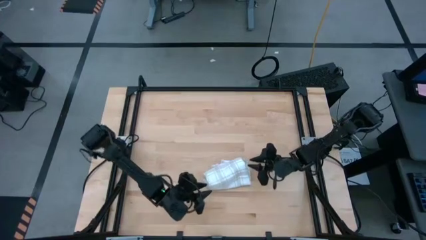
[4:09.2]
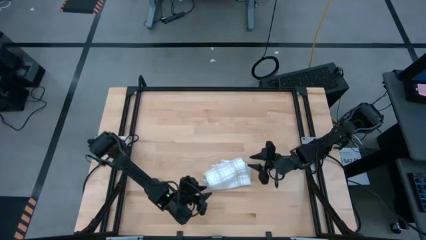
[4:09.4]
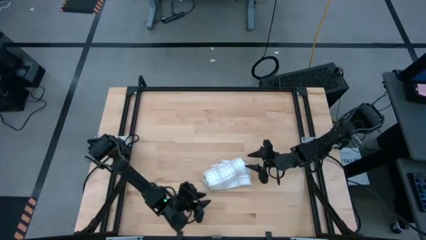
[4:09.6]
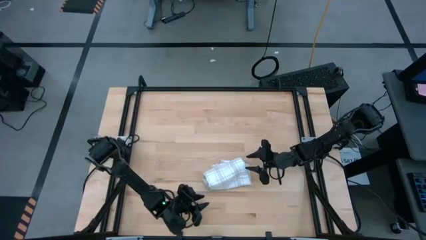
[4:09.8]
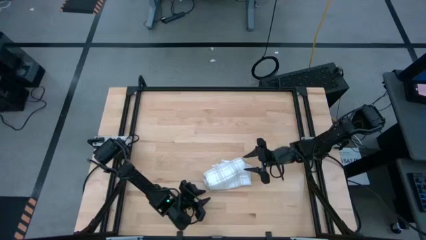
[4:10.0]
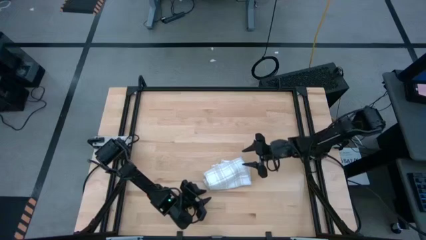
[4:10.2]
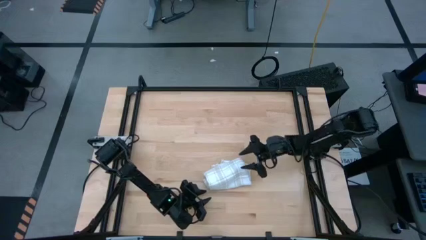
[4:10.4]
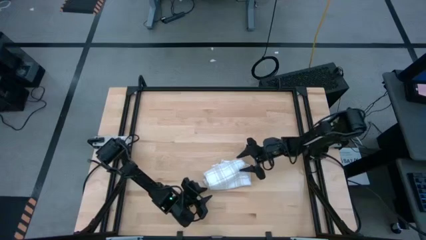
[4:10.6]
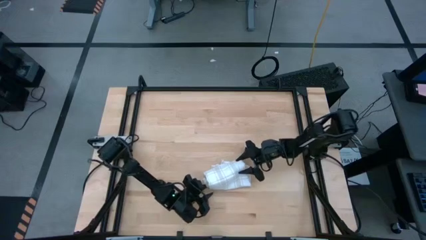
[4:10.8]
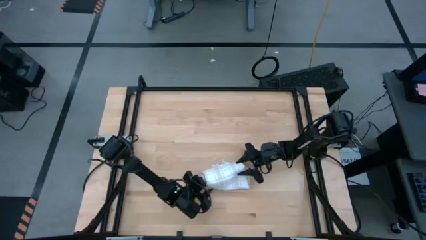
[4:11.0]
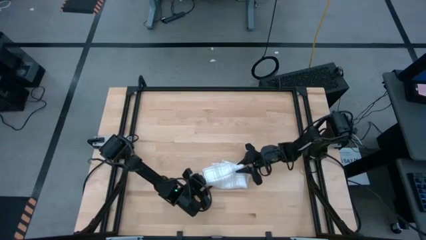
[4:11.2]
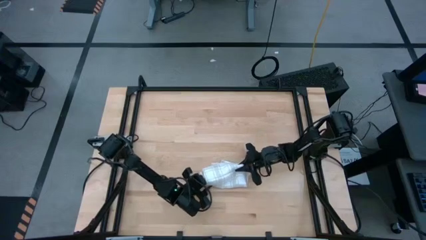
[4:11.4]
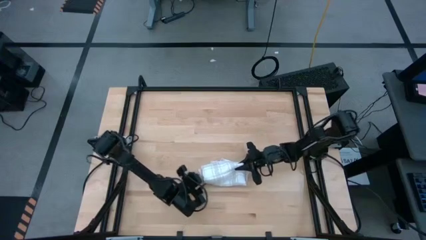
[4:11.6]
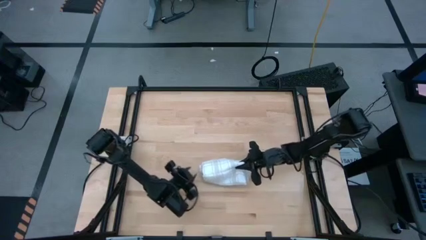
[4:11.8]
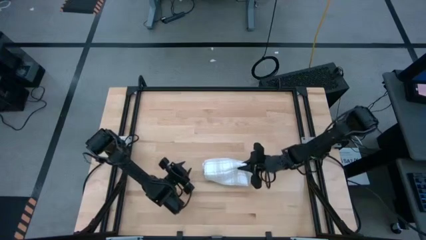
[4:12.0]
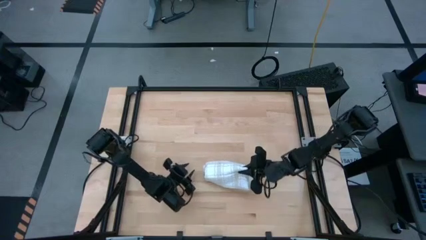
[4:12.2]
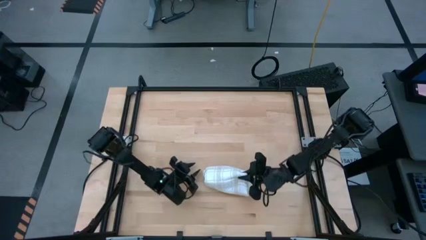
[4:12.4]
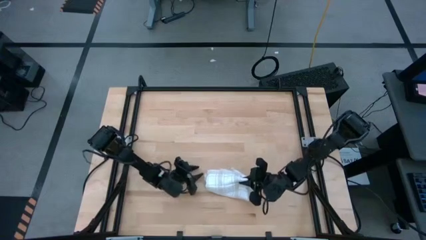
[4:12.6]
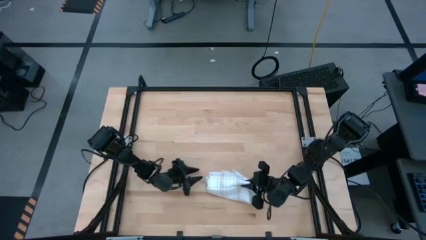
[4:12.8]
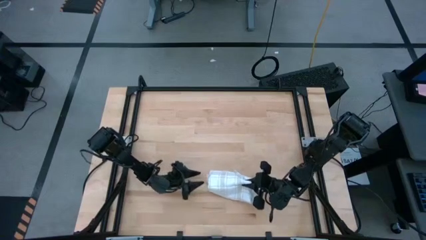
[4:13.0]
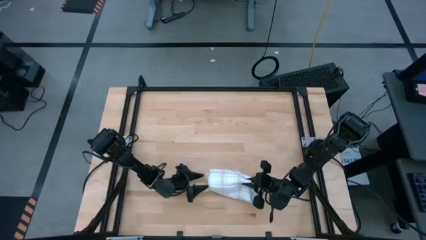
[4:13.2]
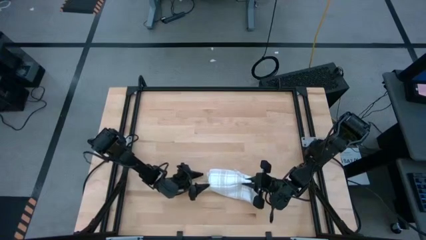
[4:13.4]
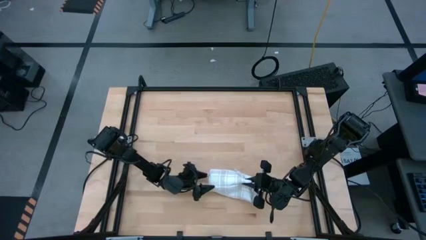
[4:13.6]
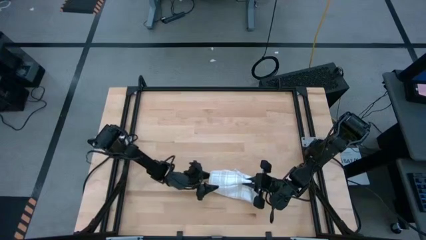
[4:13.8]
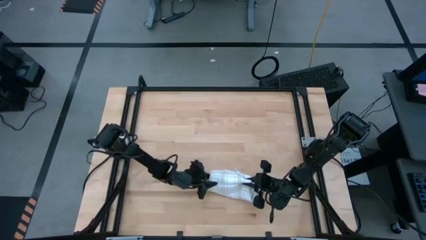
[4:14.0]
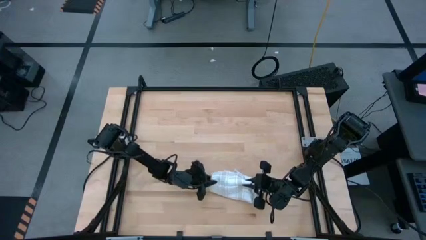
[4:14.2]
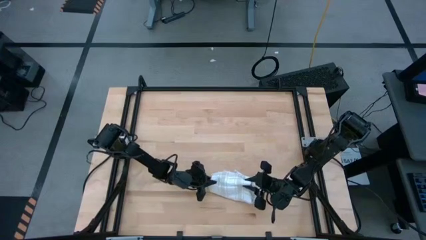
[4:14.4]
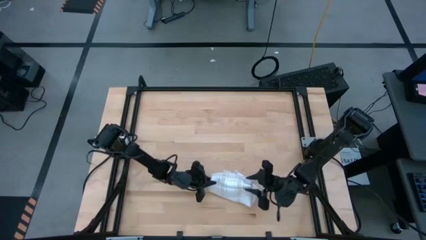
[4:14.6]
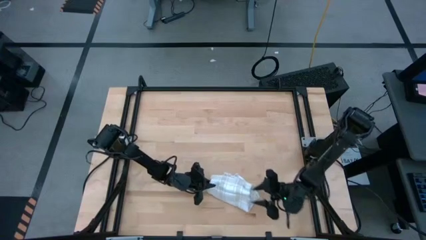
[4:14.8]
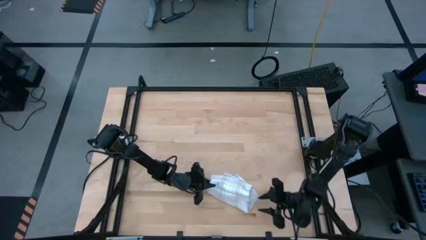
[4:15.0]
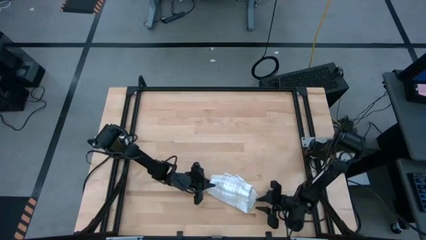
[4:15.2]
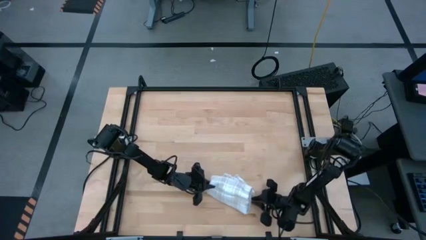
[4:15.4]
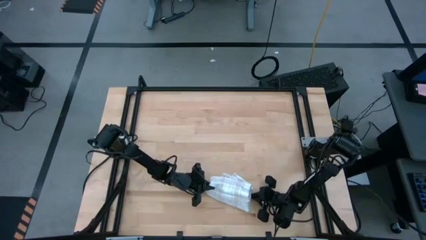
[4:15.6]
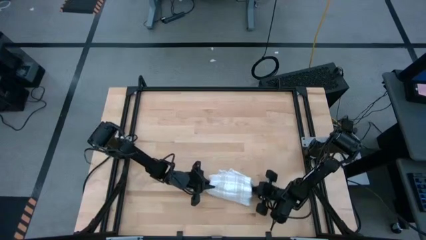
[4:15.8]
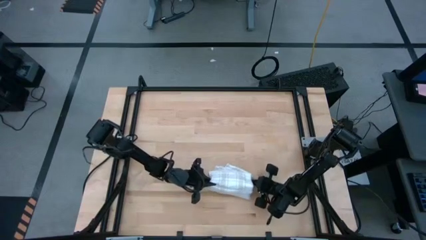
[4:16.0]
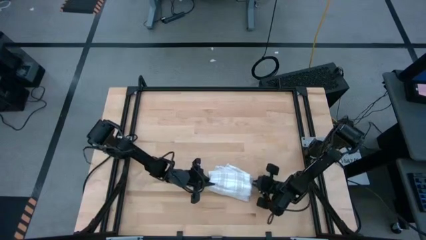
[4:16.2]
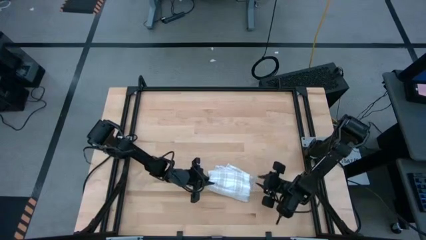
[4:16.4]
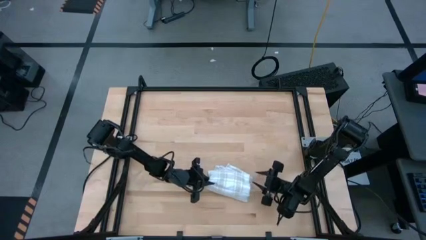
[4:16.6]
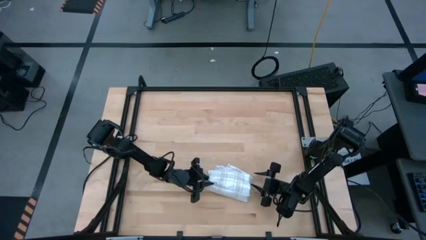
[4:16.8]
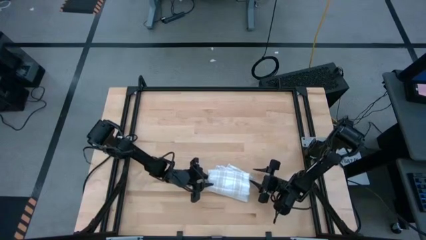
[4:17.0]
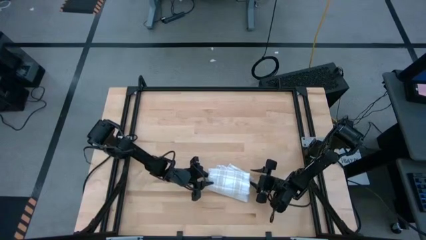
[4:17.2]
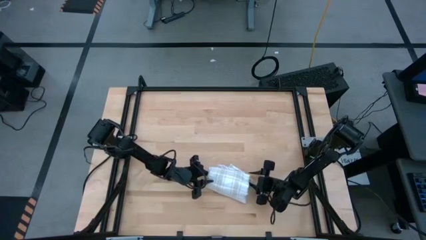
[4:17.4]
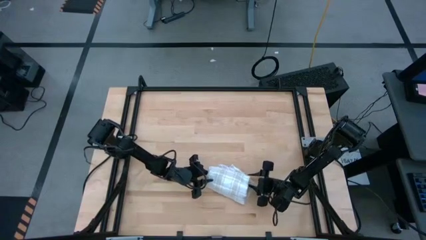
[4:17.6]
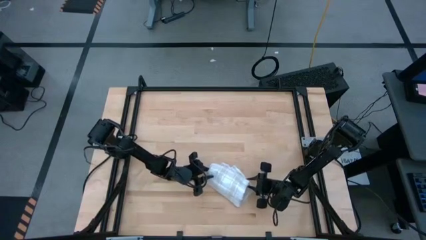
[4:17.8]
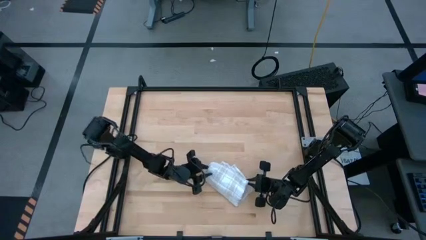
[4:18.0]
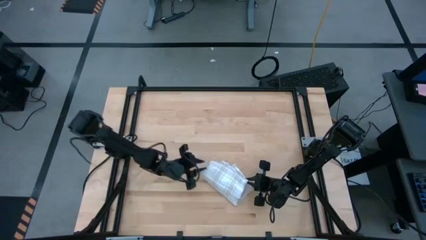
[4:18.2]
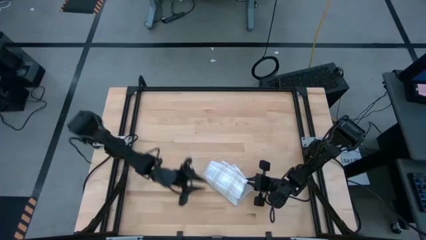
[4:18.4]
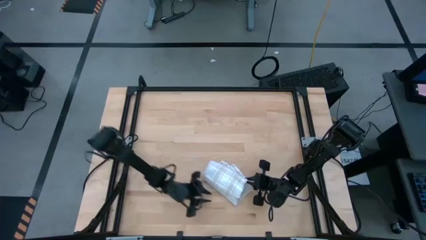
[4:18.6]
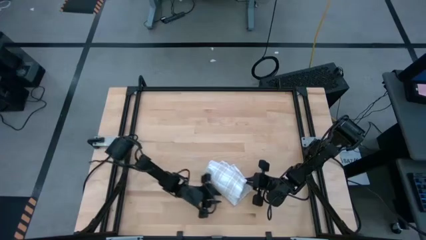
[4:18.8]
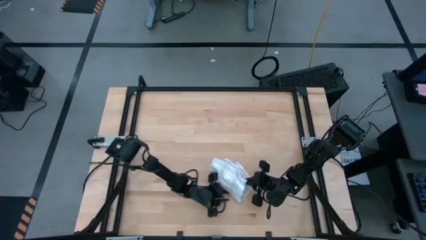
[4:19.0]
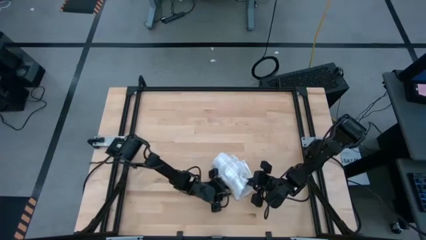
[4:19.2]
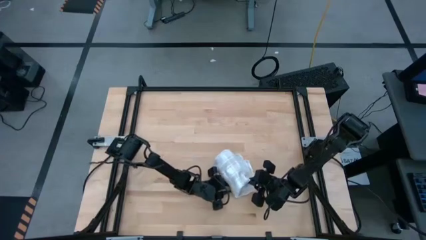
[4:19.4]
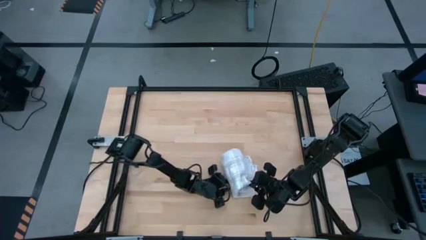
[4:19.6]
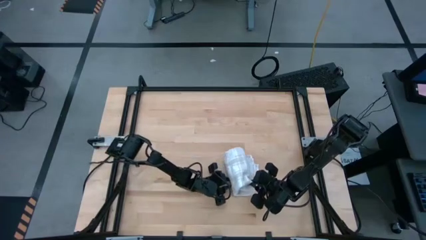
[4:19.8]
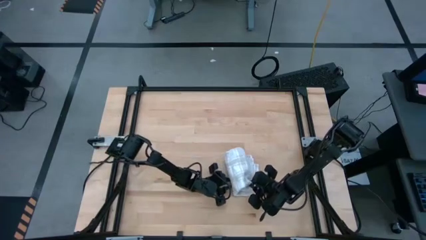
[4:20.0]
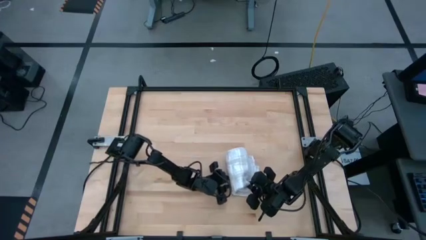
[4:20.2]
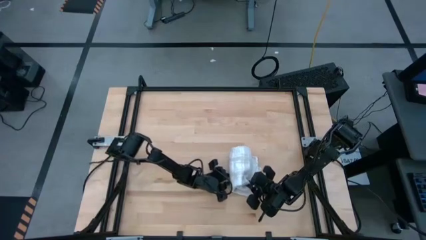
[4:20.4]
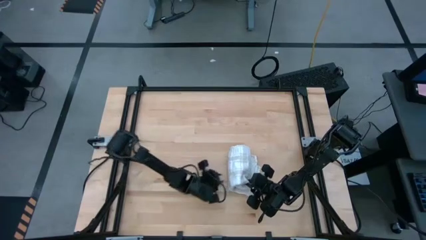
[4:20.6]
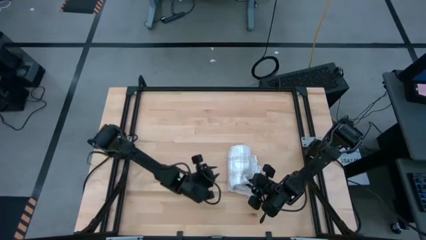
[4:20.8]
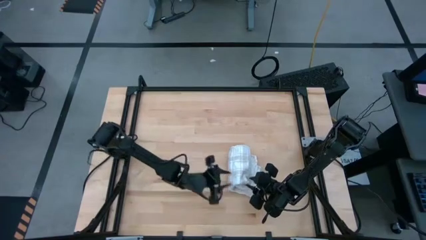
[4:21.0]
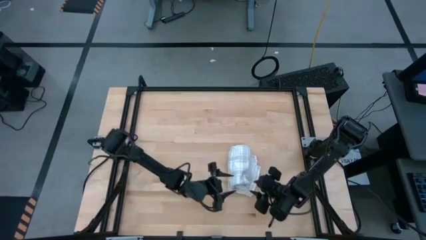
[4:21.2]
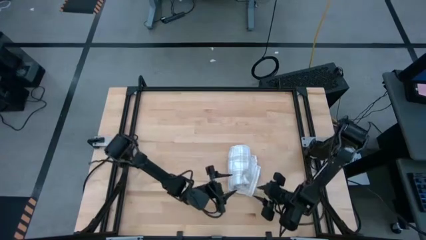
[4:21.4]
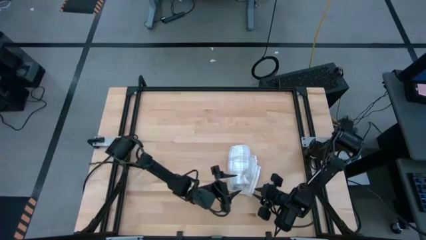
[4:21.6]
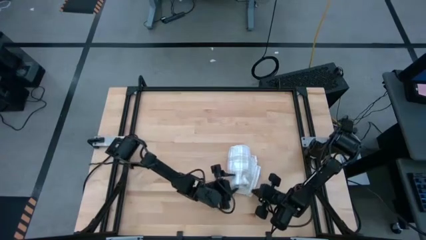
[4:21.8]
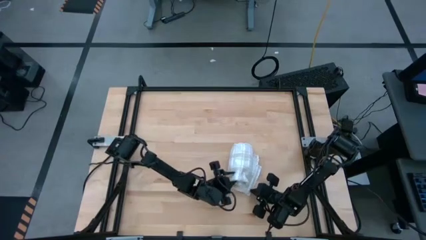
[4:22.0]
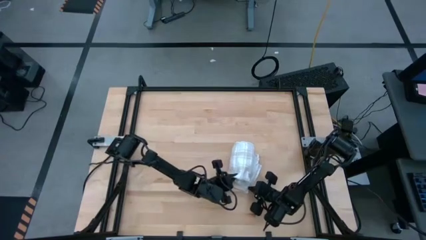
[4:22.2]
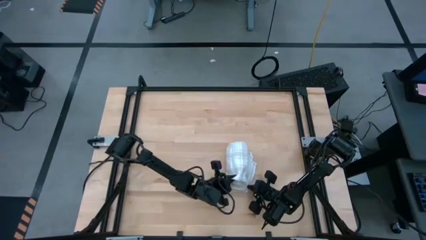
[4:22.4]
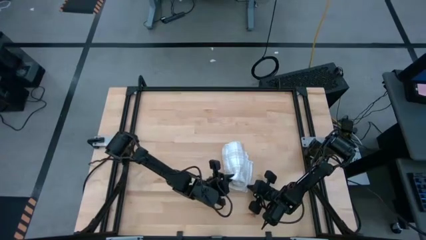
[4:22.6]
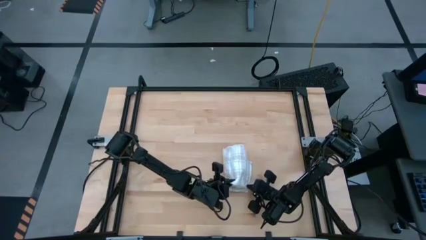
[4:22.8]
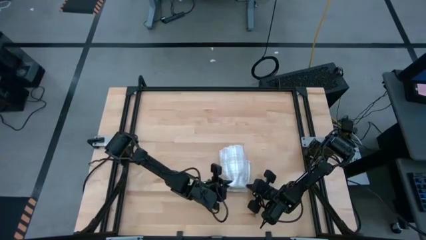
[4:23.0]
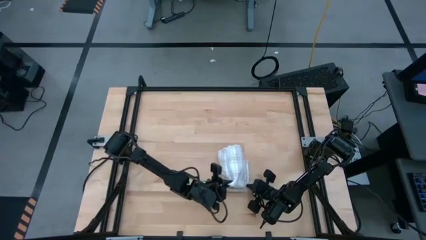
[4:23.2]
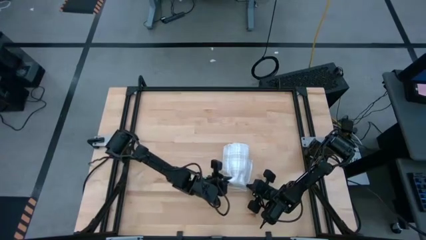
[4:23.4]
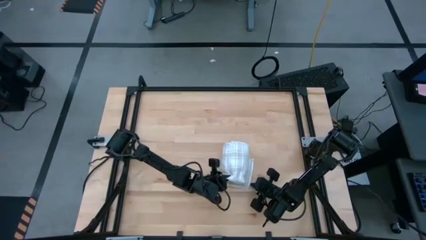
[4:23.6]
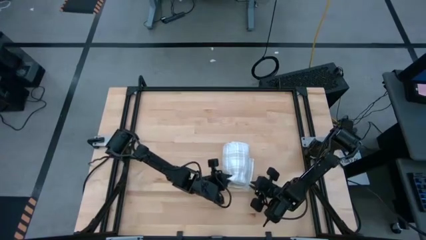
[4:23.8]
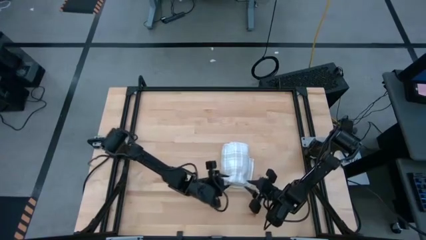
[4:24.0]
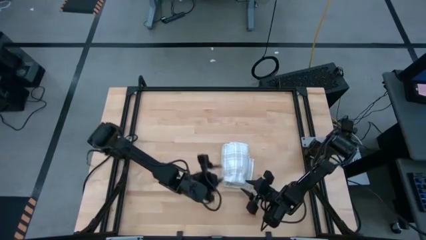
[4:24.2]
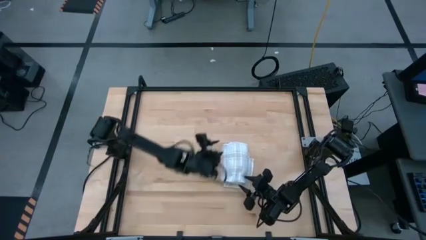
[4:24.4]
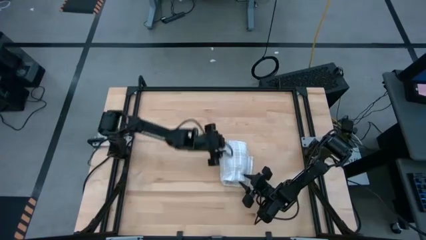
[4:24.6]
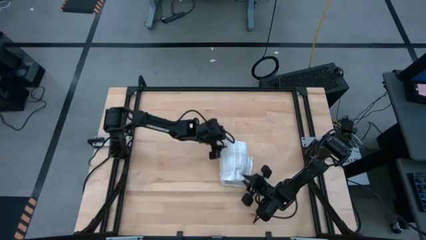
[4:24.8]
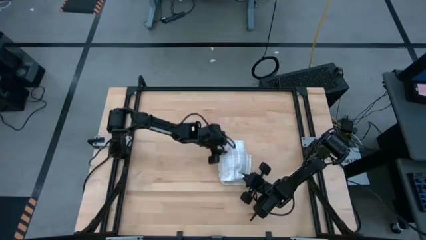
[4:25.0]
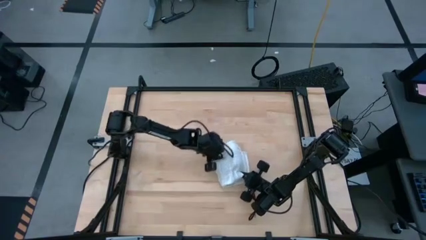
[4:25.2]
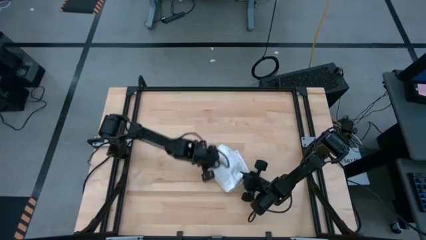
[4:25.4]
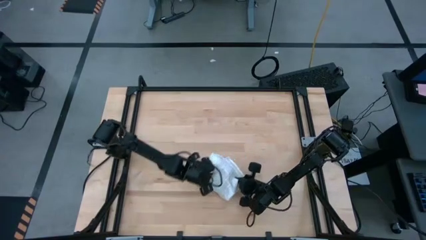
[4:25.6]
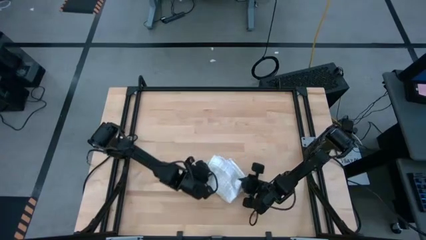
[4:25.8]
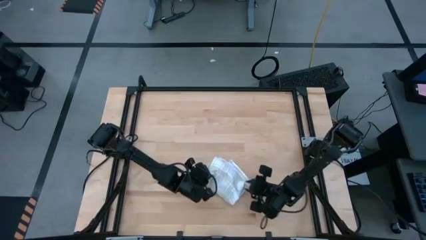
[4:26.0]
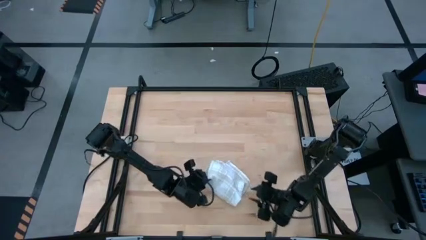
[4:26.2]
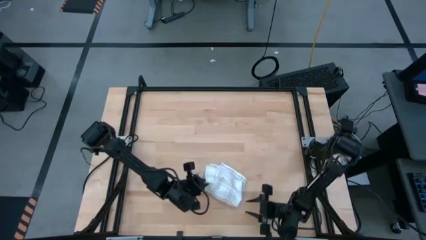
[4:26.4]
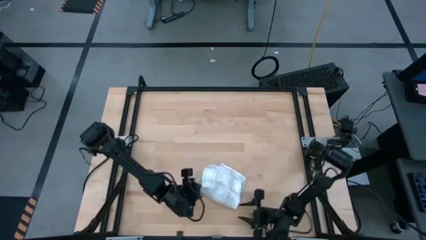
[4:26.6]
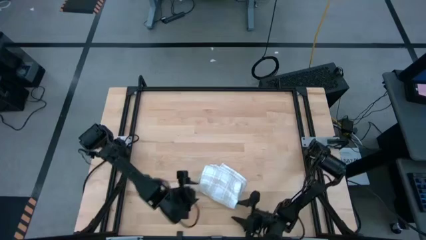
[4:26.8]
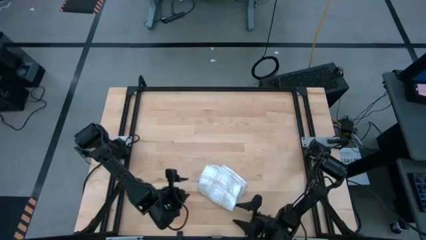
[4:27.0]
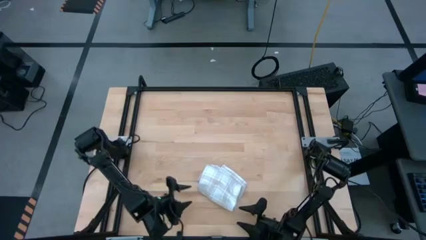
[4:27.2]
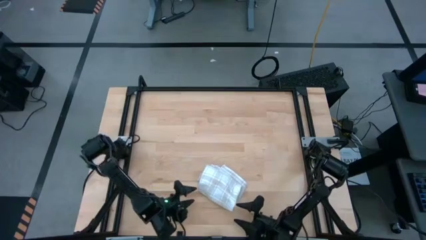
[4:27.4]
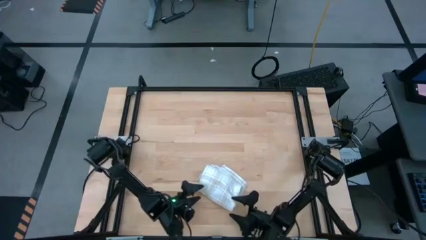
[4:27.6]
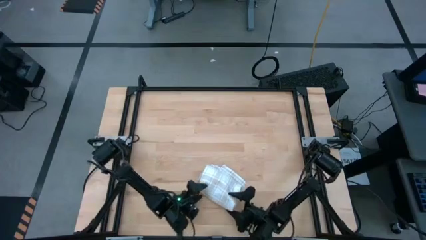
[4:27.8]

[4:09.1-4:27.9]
Task: Roll towel
Roll the white kitchen towel
